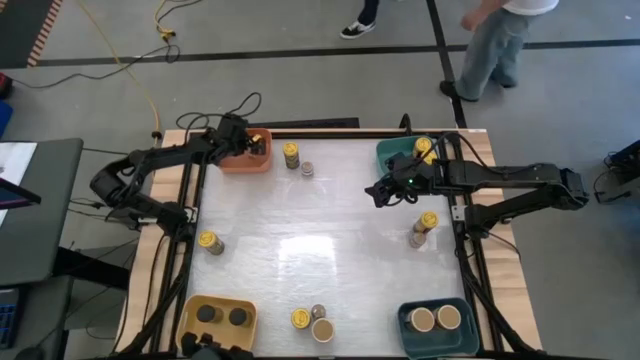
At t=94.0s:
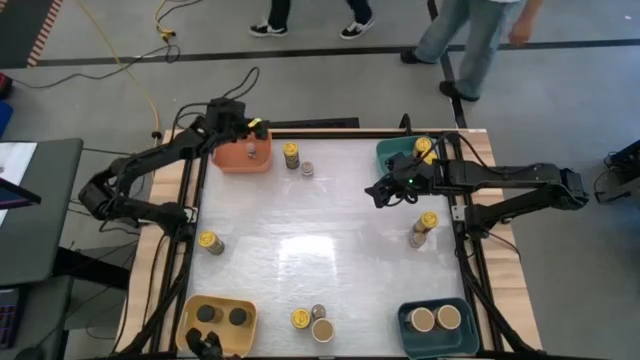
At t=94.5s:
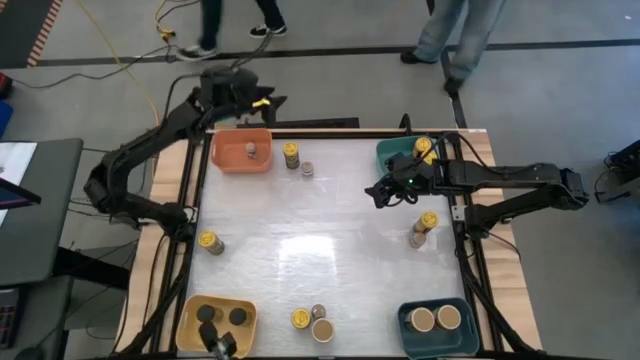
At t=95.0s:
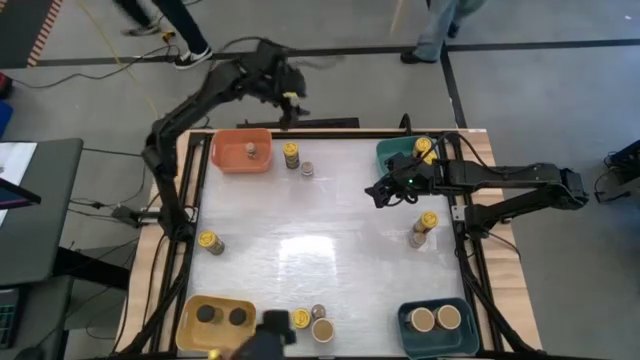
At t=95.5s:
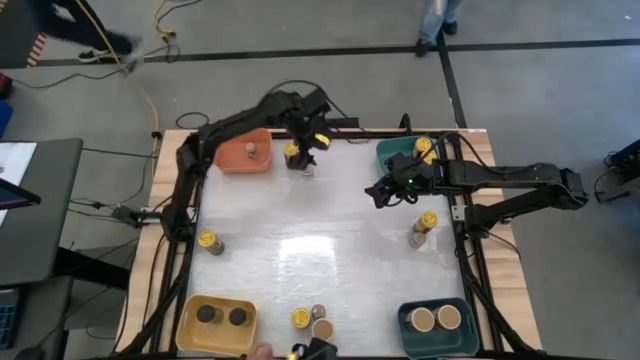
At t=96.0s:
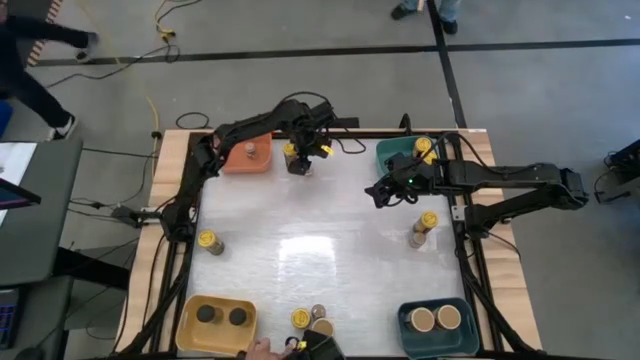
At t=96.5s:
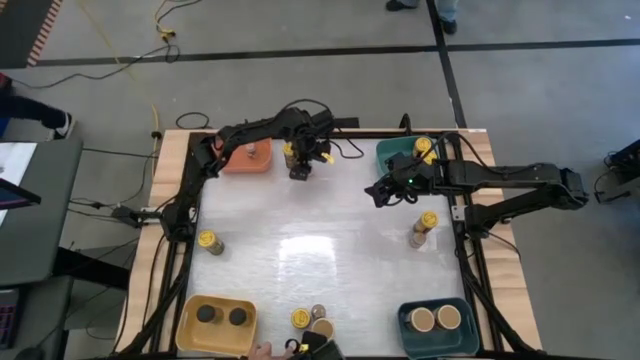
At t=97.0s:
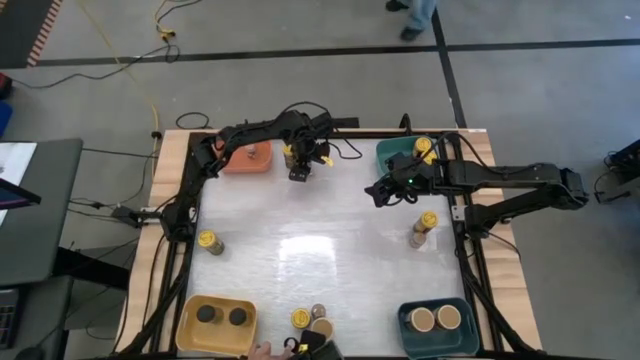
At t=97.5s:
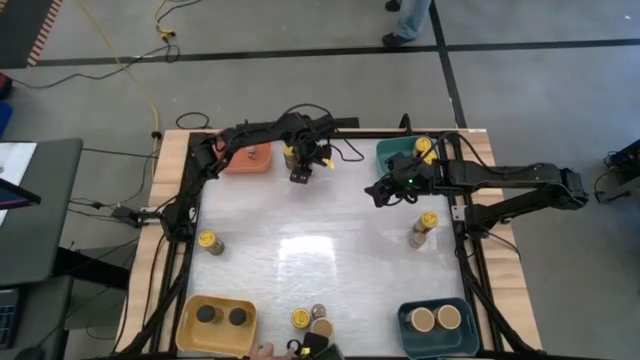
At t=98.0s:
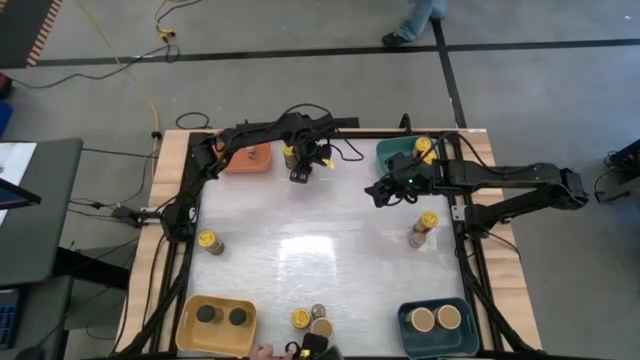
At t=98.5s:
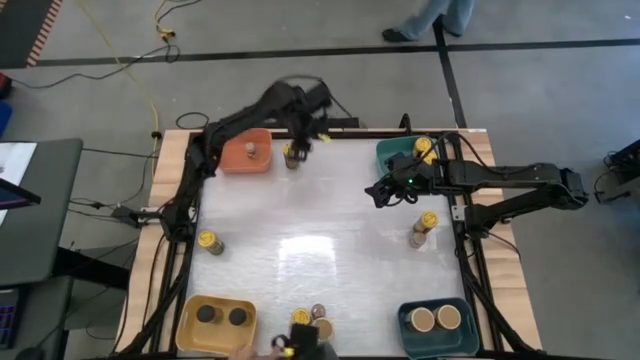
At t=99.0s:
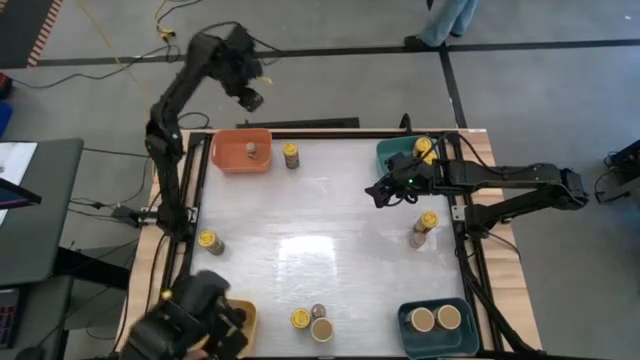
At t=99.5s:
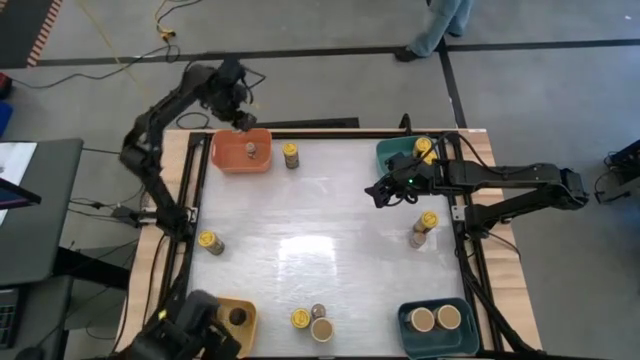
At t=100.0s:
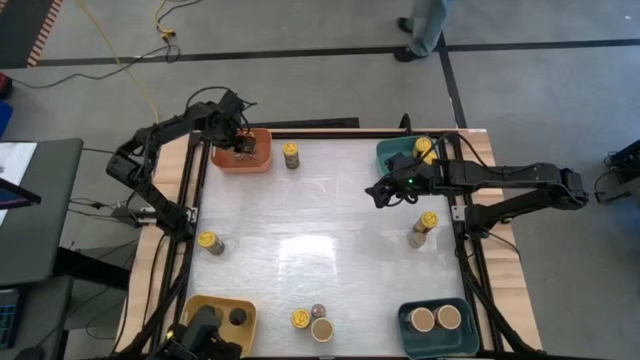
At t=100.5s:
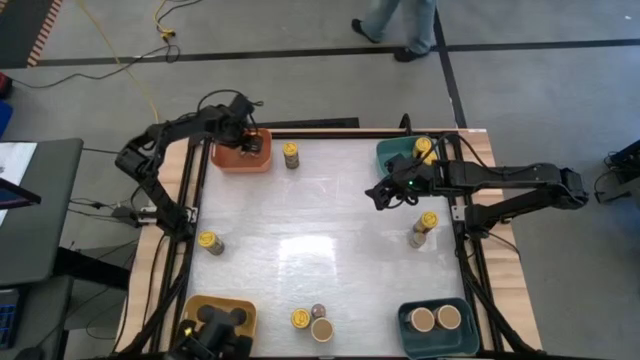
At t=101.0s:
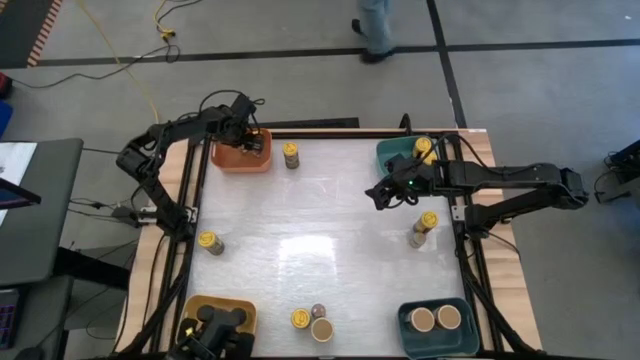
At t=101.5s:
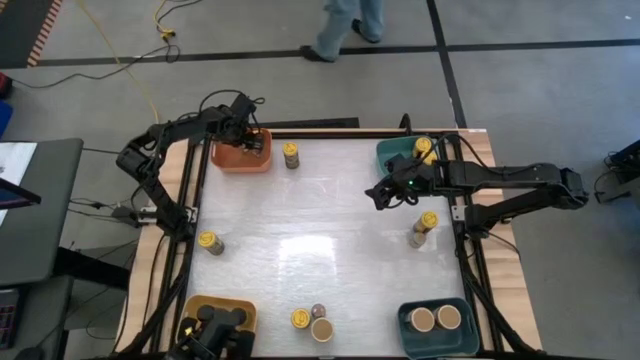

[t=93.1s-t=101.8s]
Task: Sort spices by type
Put the top brown small seasoning bottle into the orange bin

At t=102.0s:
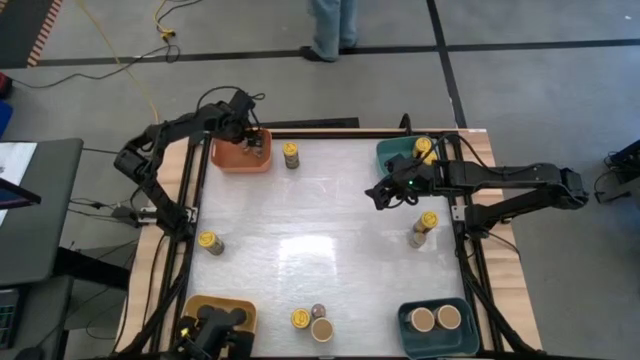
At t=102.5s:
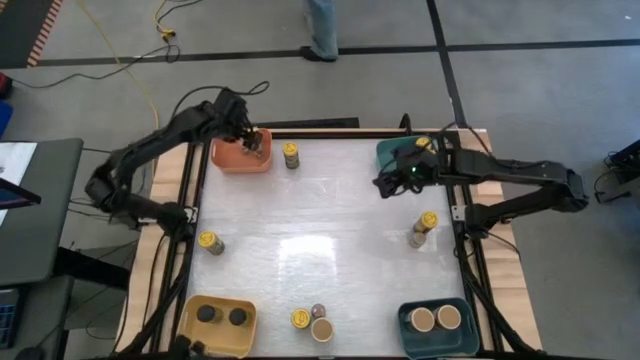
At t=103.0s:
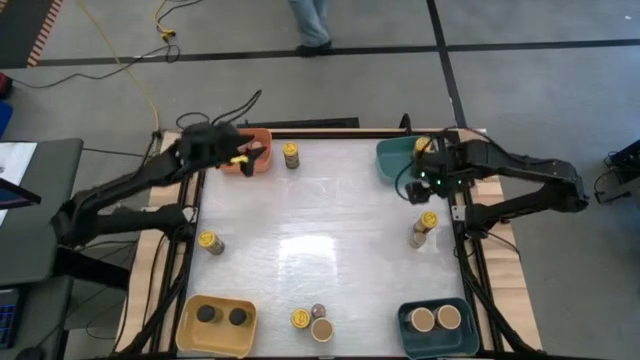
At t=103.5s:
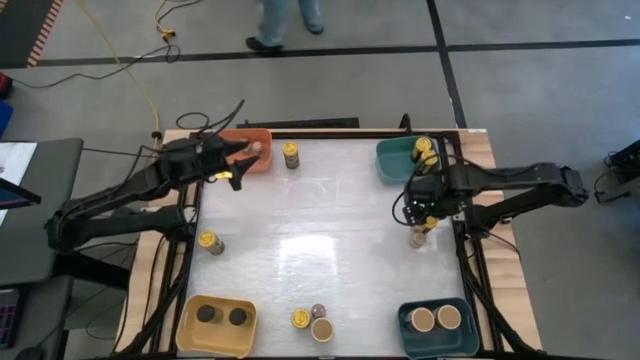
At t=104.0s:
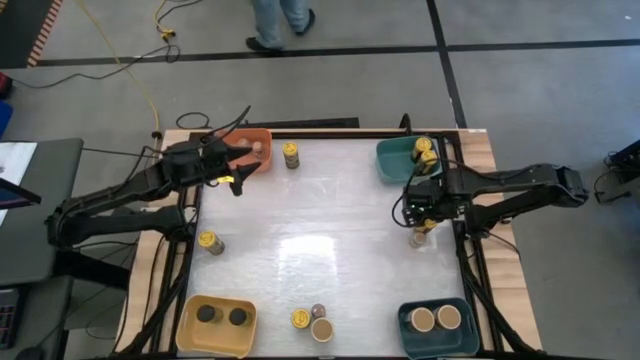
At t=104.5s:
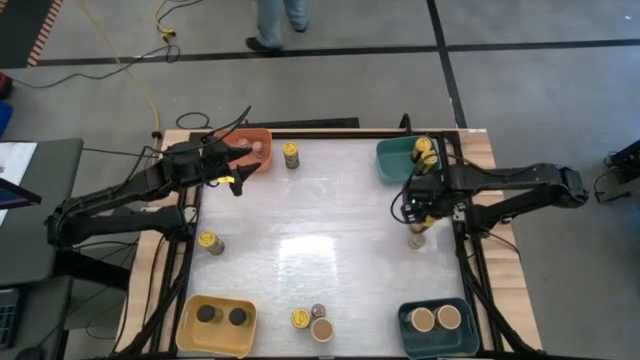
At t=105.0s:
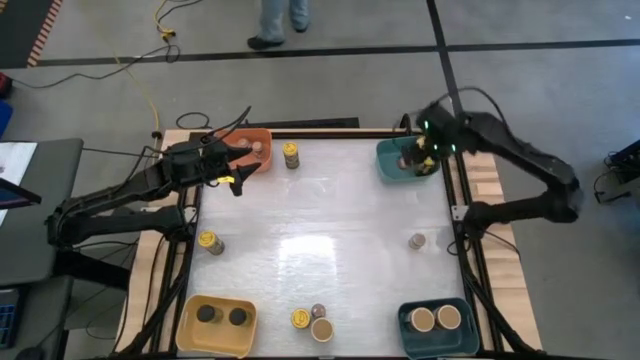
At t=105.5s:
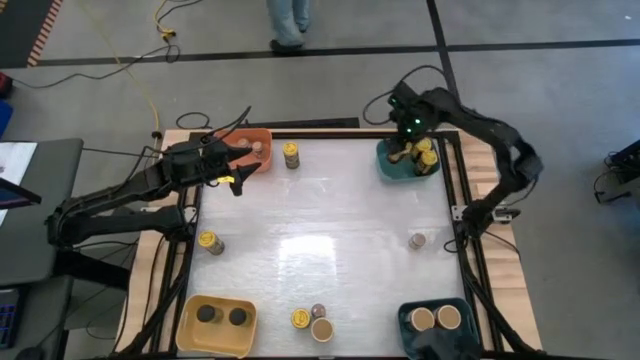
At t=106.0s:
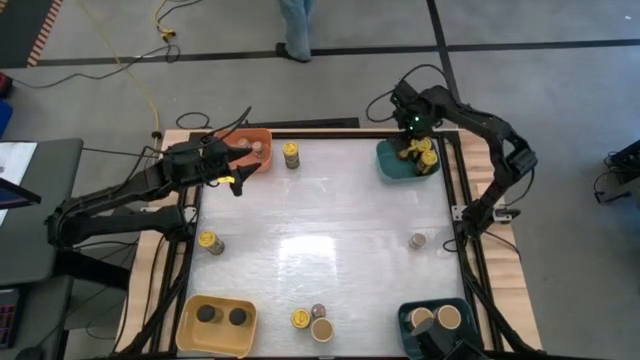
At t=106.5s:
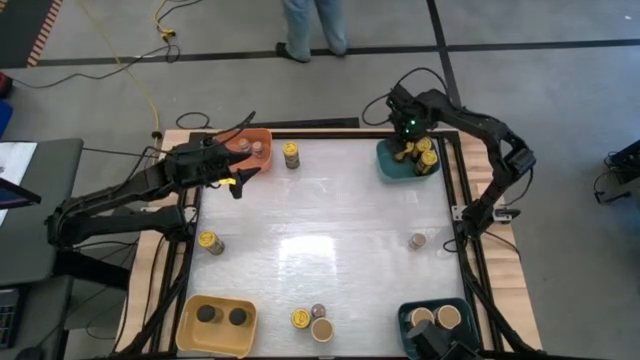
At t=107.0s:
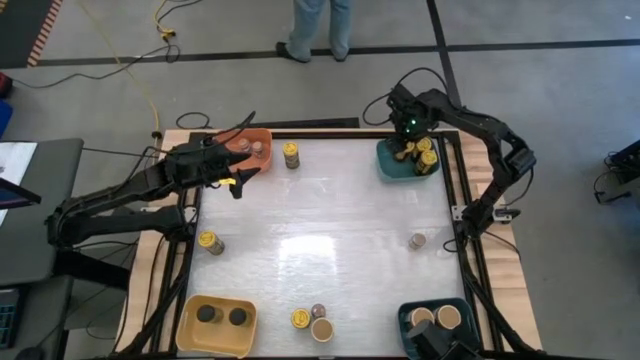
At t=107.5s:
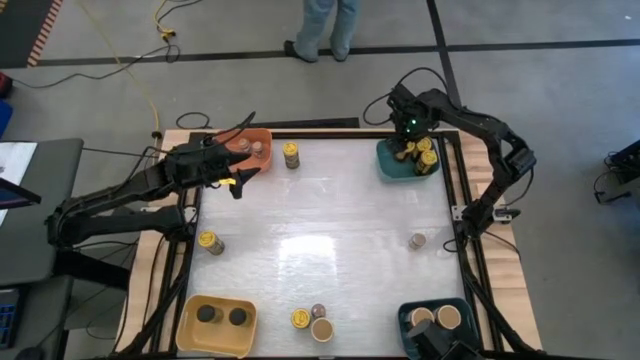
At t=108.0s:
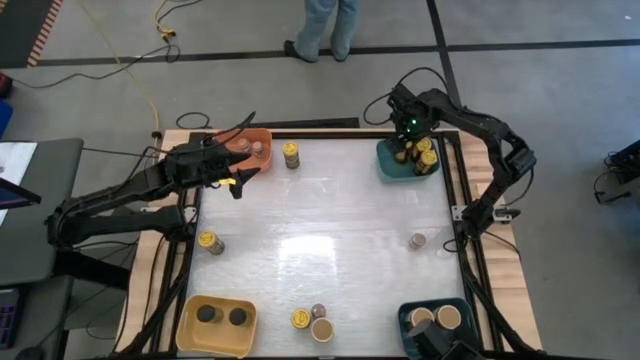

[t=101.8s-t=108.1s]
Put the middle right yellow seasoning bottle into the light blue bin

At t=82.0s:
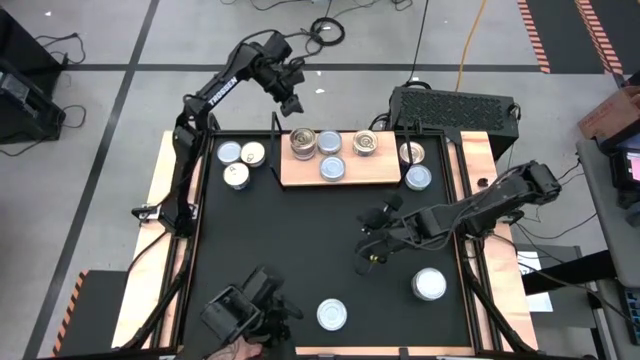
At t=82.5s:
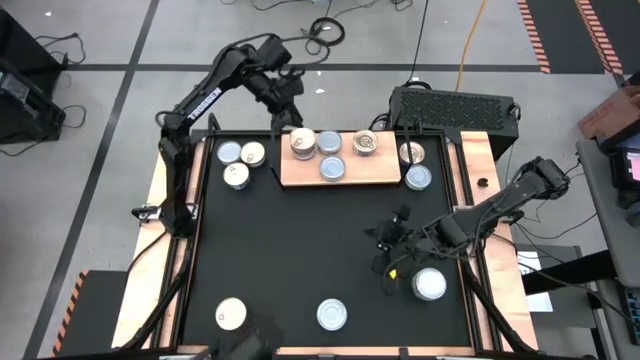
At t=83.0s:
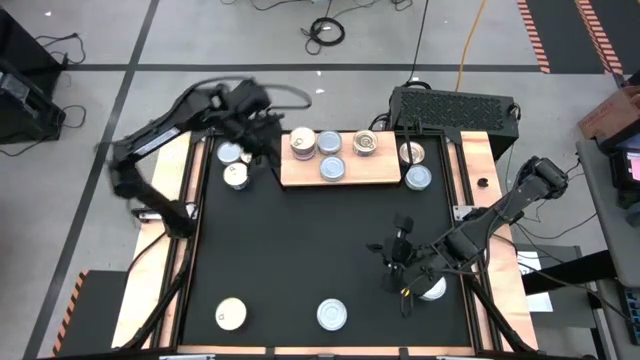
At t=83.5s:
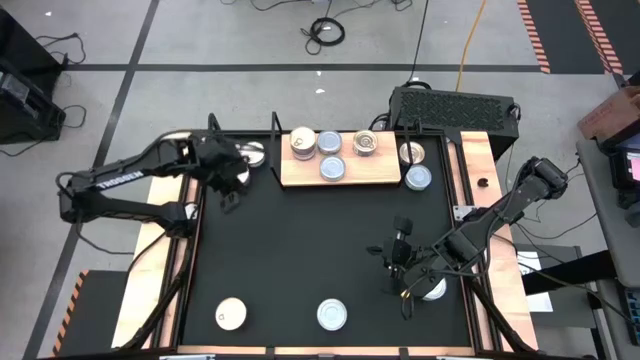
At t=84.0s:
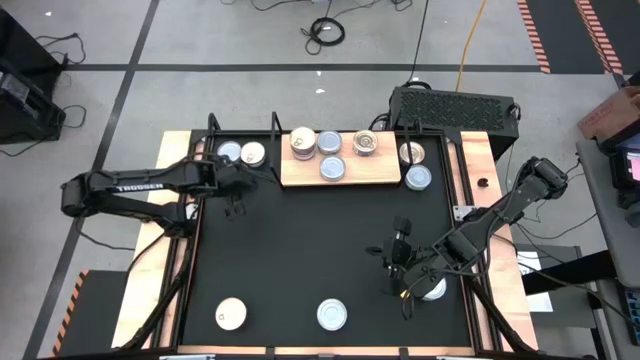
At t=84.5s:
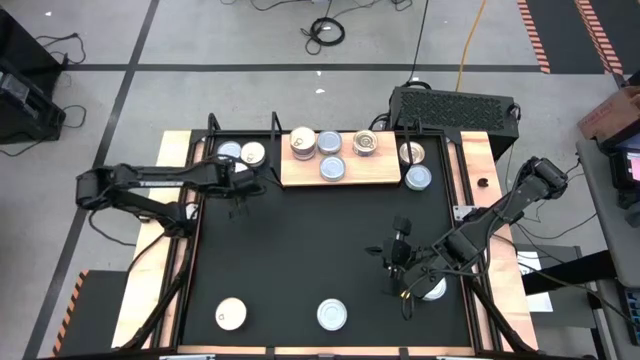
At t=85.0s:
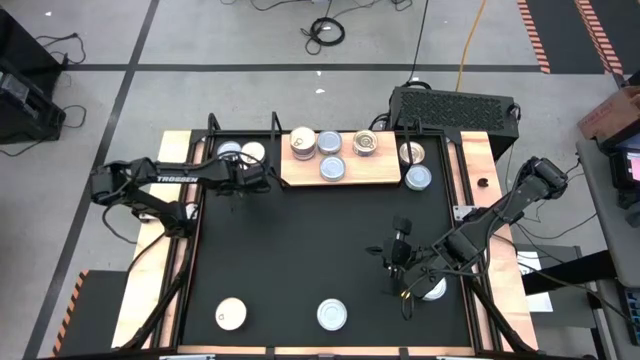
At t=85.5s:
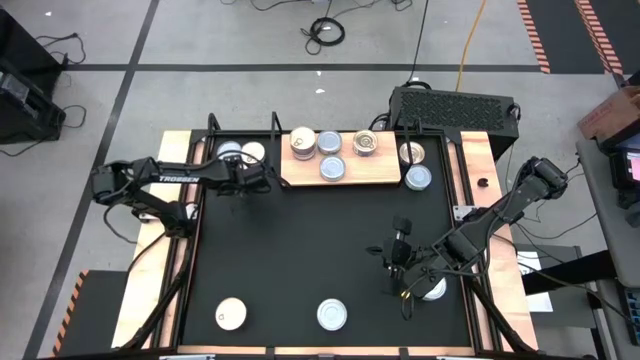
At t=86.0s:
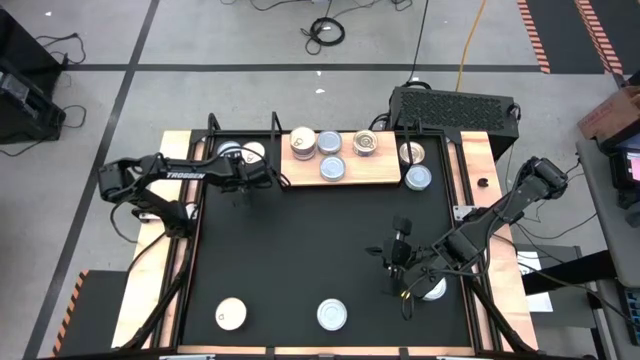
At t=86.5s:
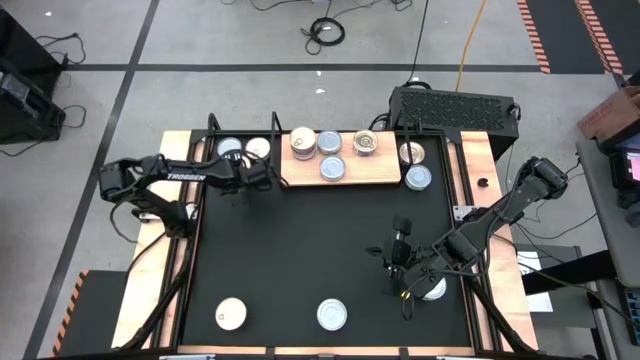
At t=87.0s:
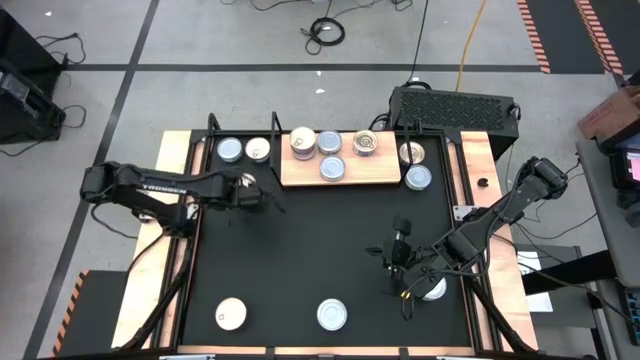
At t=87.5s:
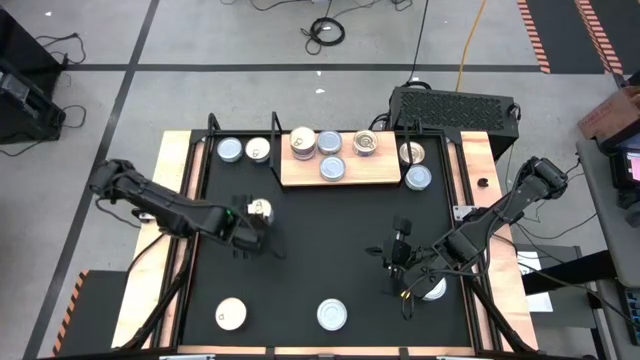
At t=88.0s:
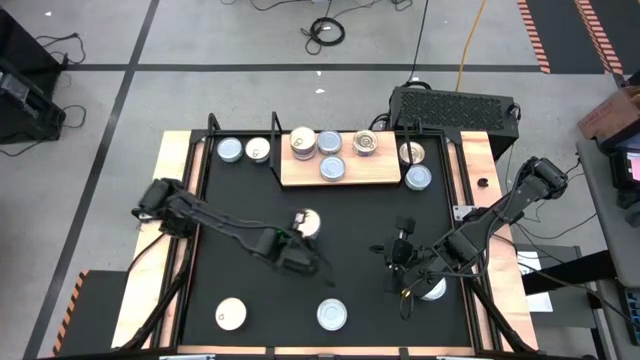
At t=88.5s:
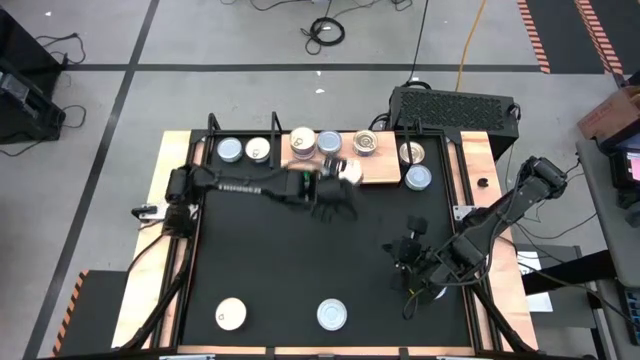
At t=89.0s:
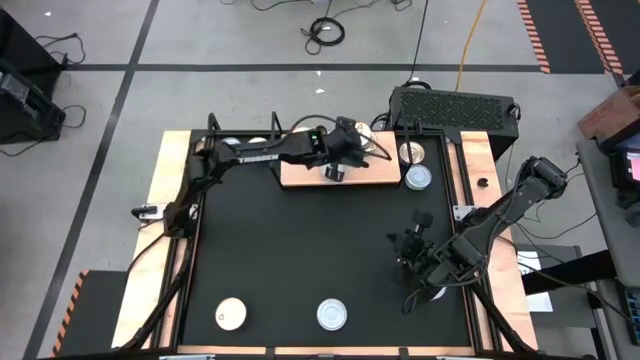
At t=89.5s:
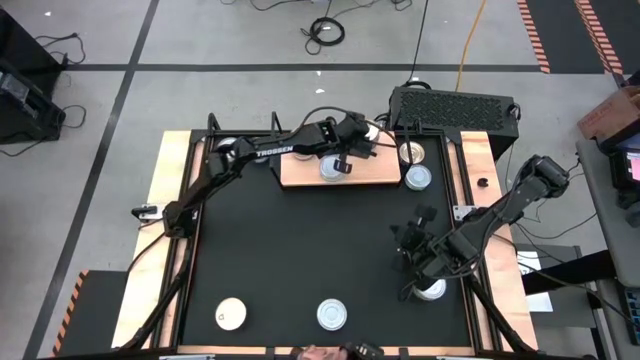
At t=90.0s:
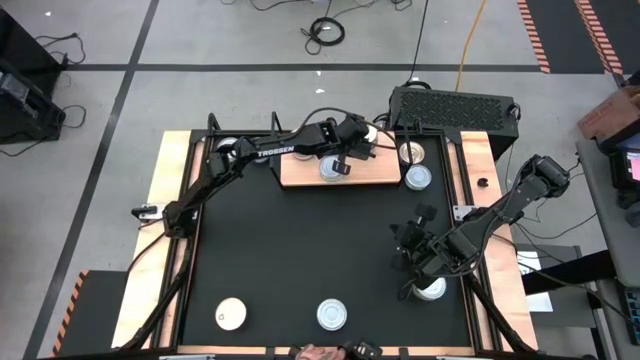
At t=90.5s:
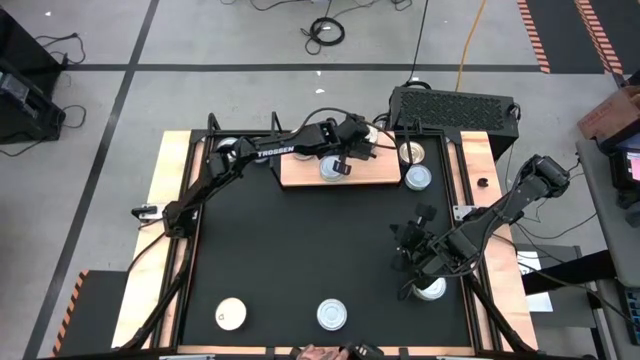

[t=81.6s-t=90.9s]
Task: Stack canned seafood by type on shelf
Stack the bottom left blue tuna can on top of the blue tuna can on the shelf
